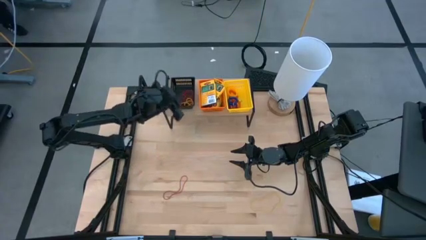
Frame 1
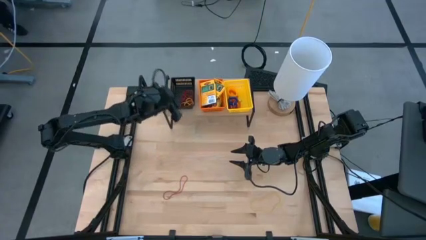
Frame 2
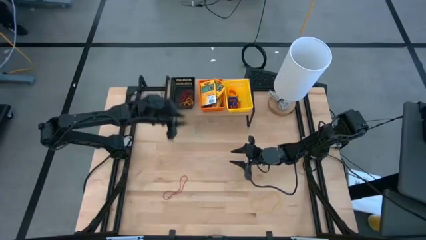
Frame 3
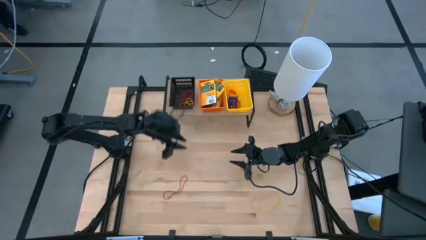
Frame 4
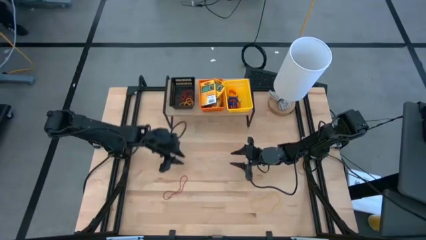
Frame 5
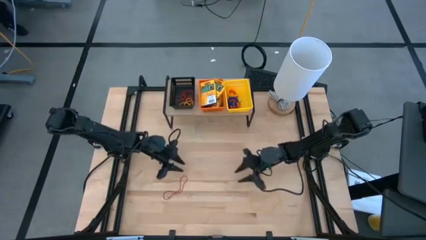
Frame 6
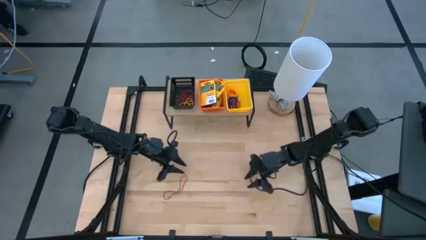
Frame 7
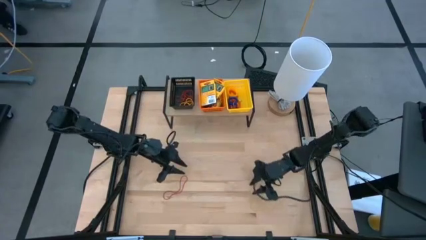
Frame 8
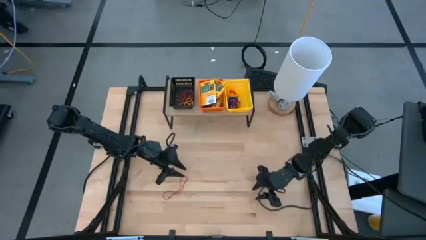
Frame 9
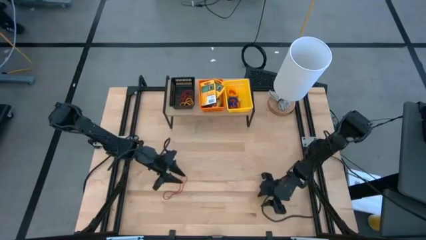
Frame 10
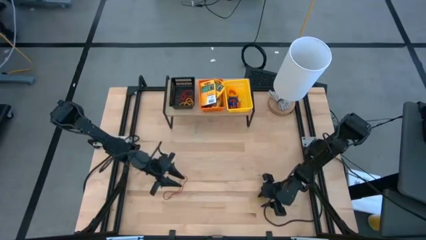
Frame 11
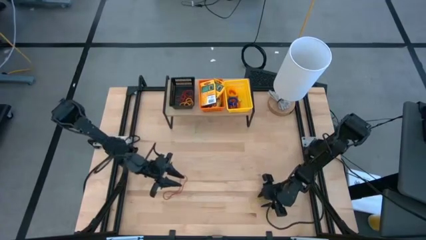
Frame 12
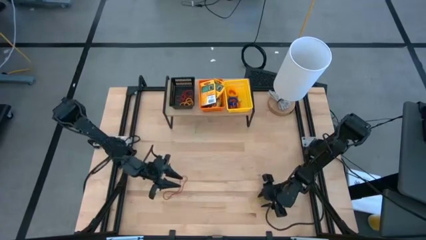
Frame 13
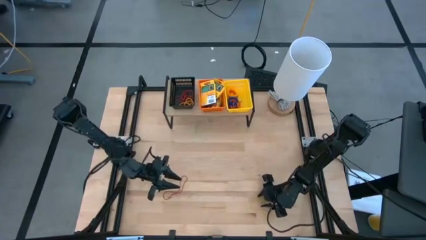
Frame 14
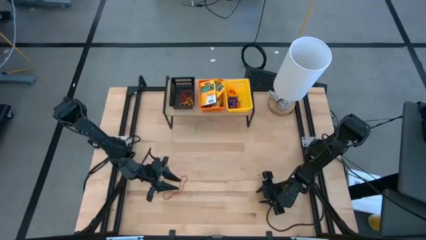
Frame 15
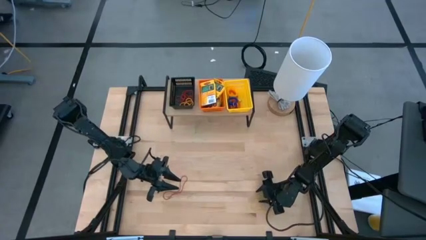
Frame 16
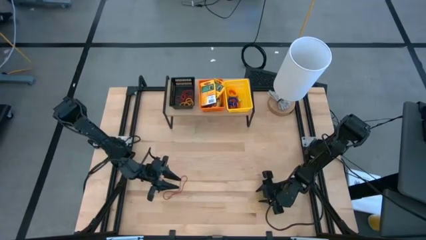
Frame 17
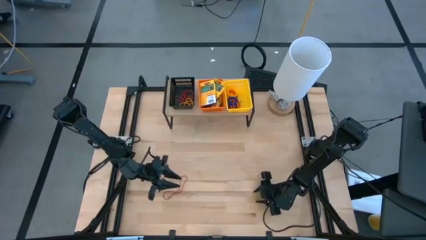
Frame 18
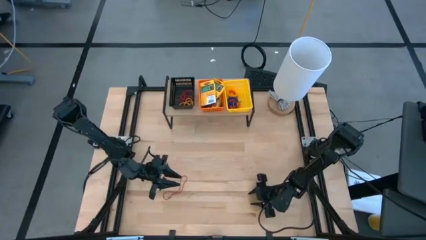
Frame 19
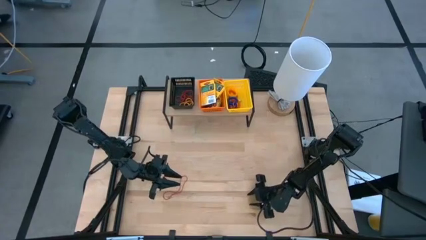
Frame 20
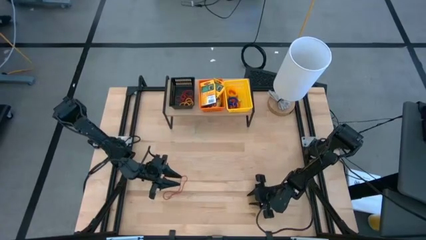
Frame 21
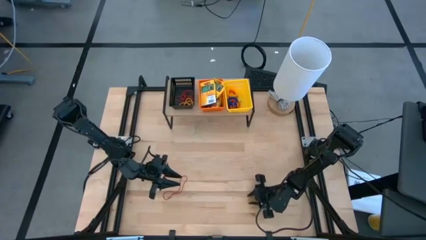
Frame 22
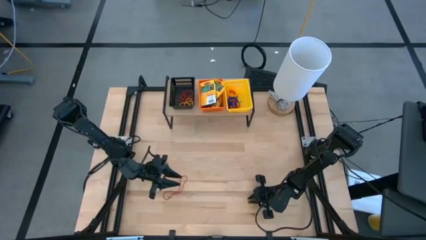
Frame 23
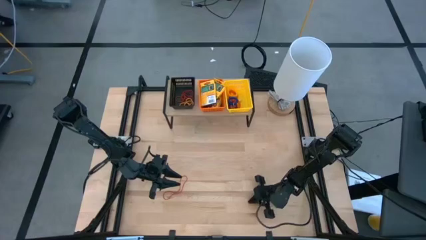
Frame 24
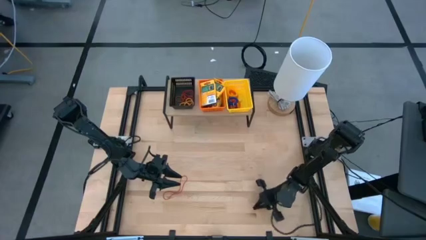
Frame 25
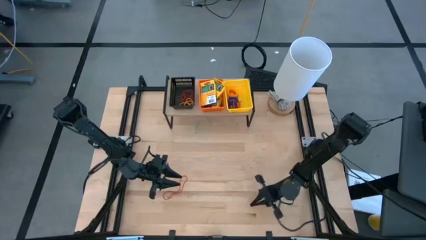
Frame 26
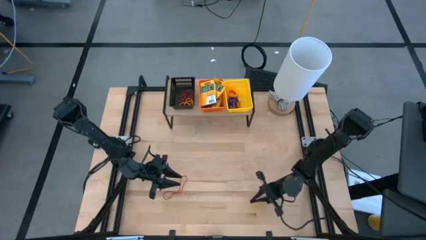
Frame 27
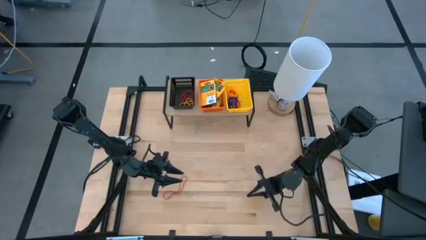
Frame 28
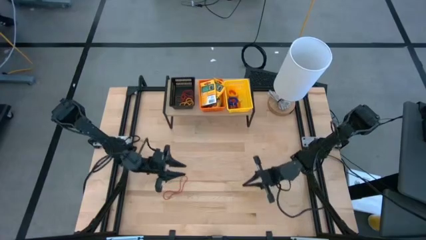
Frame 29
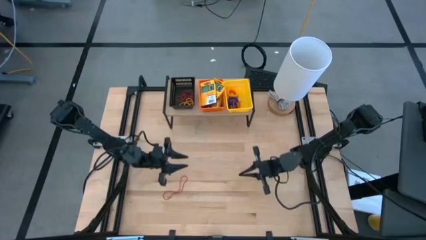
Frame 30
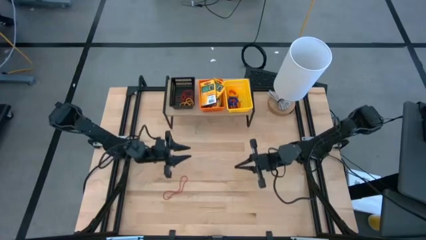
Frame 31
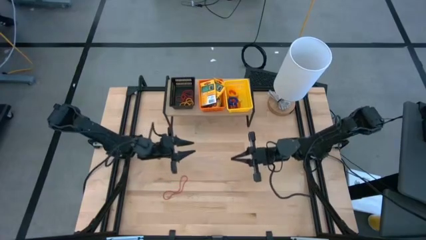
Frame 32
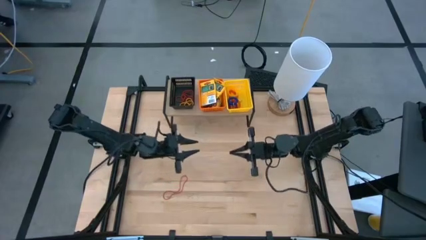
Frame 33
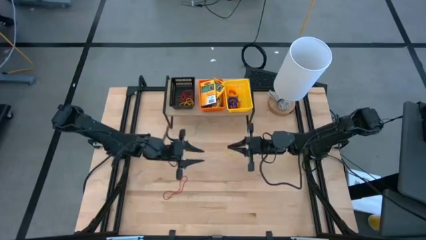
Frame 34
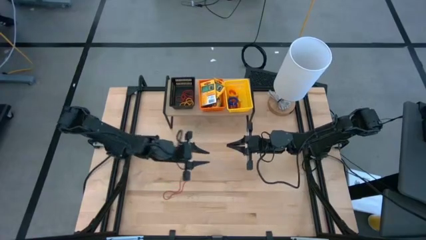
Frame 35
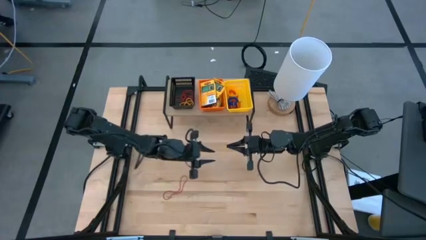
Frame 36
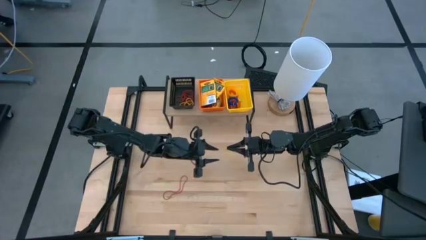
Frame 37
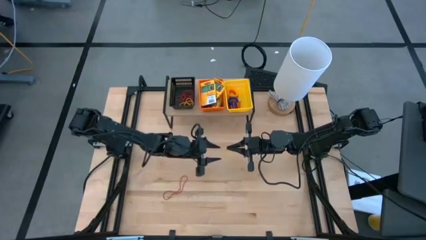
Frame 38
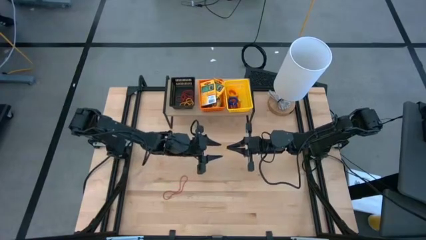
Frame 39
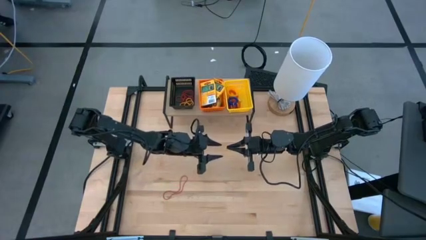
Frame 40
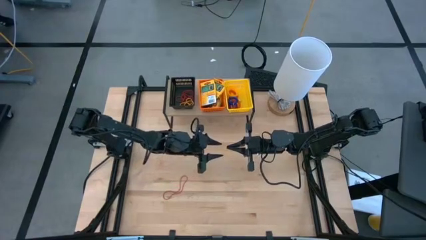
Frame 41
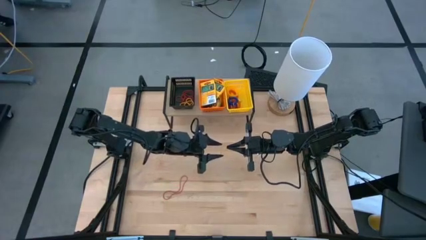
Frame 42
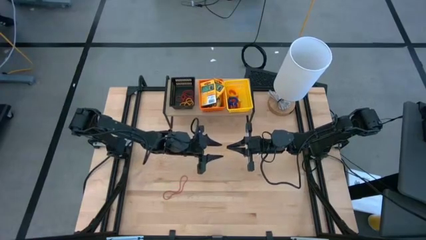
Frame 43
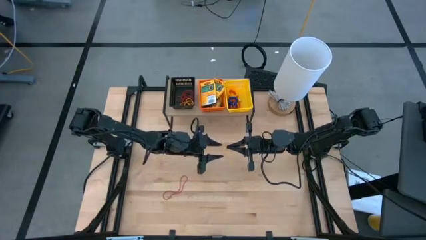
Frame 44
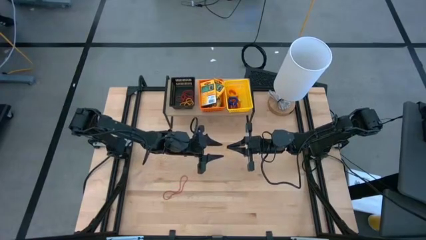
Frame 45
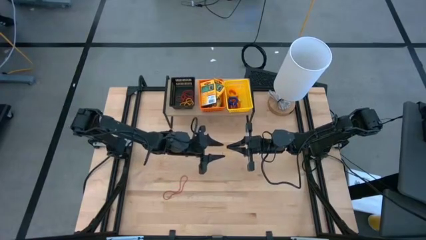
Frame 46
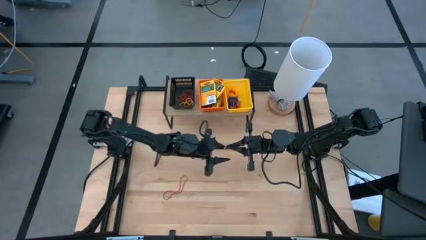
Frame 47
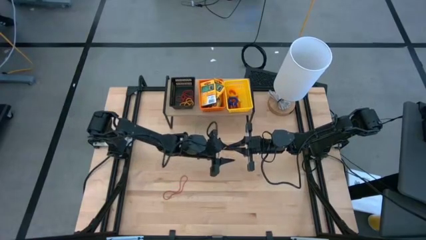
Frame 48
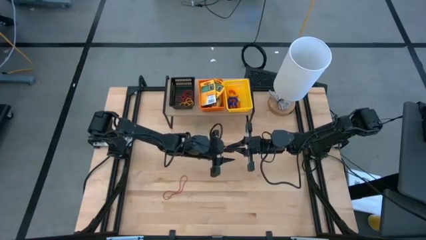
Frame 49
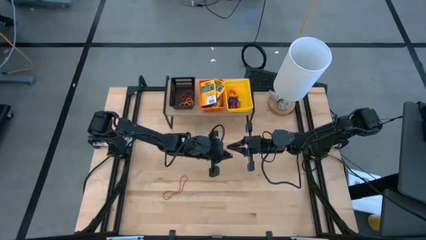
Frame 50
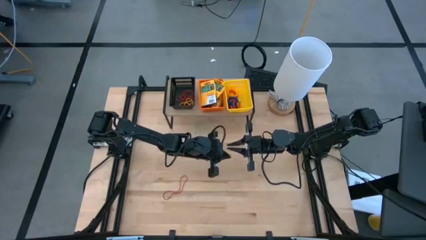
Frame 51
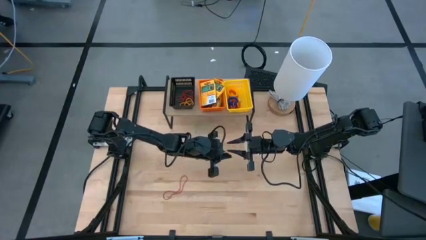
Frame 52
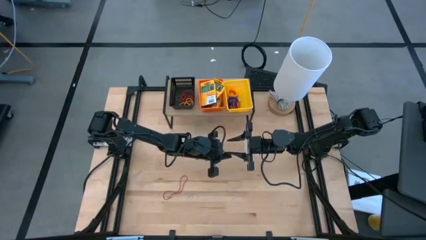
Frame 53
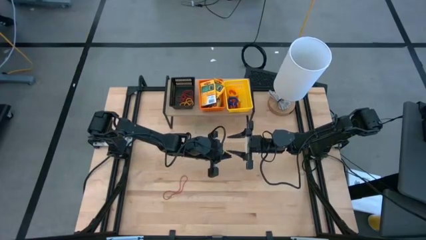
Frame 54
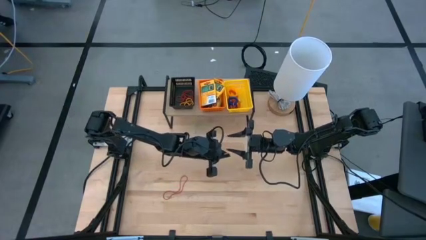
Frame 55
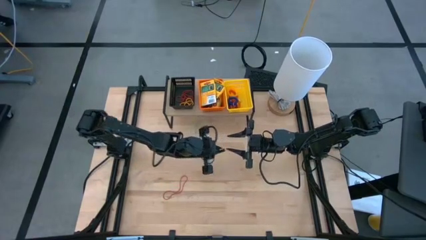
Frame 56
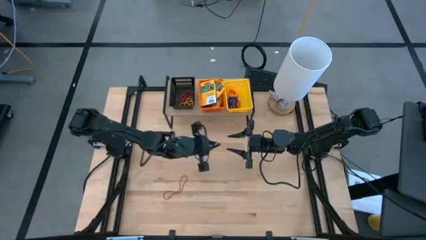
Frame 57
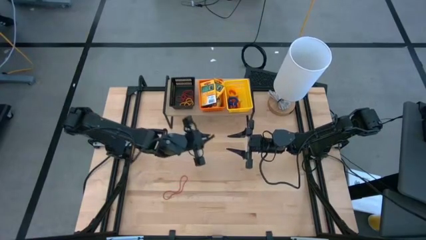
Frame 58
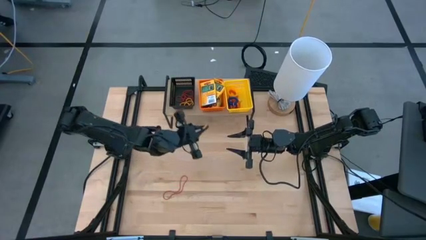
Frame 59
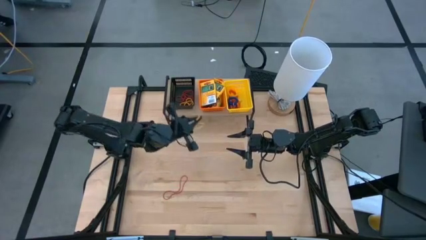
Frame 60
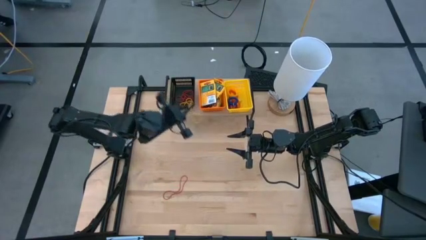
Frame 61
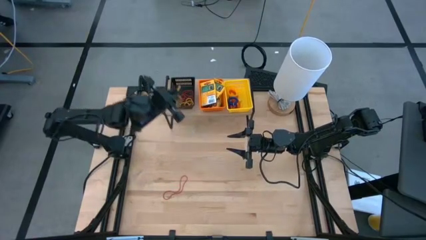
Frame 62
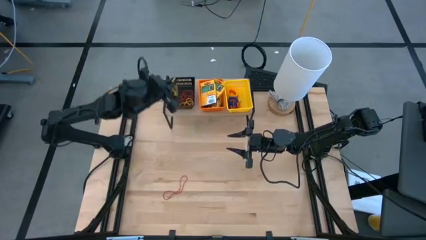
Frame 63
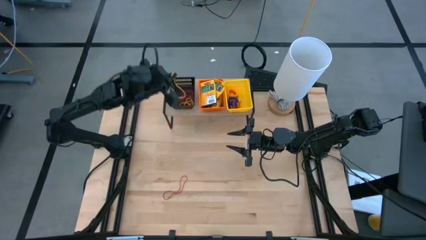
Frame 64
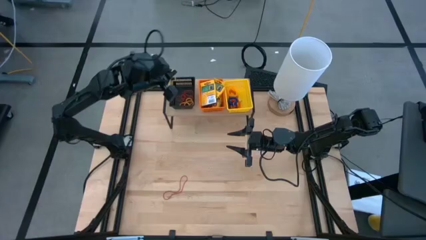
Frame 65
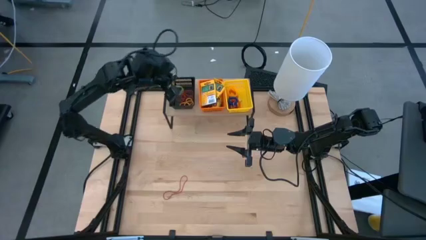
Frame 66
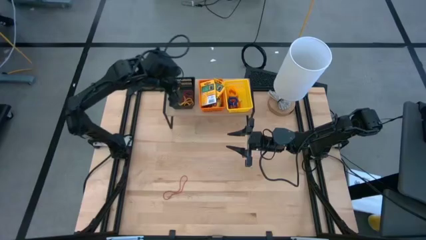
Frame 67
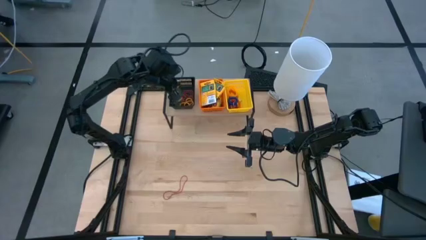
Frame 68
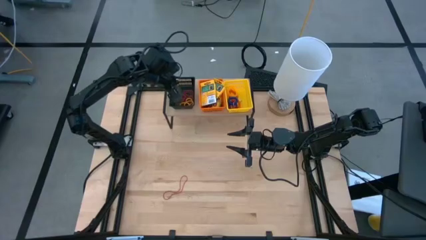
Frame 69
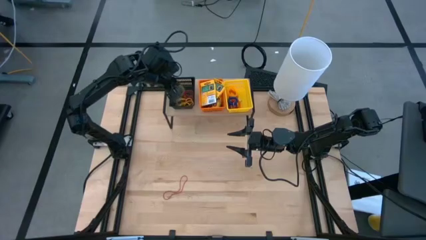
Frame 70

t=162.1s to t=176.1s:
Task: Pick & Place Office Desk Supplies
Put the yellow rubberband into the black bin on the shelf

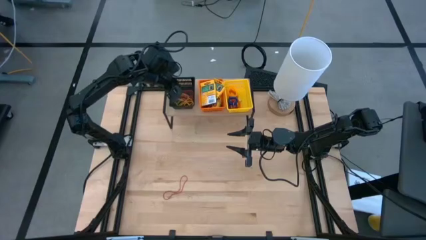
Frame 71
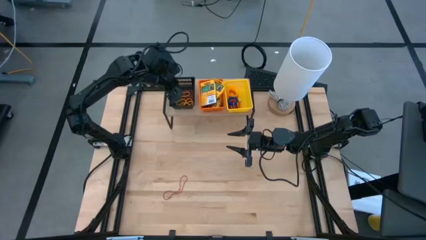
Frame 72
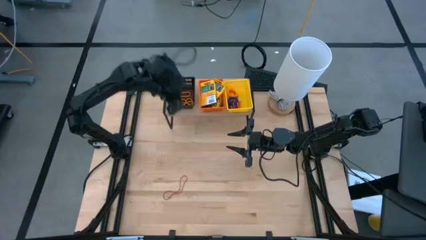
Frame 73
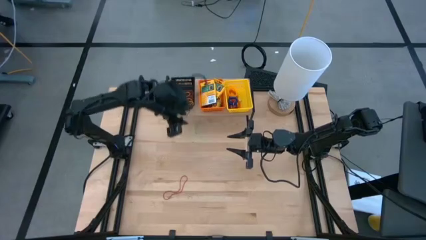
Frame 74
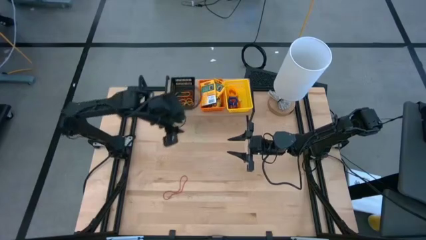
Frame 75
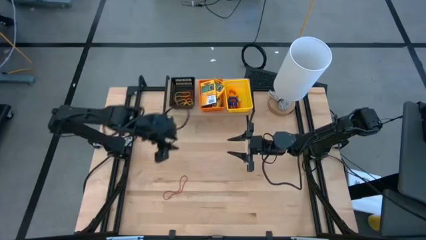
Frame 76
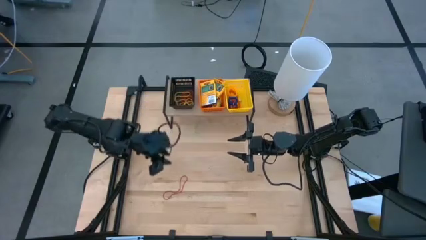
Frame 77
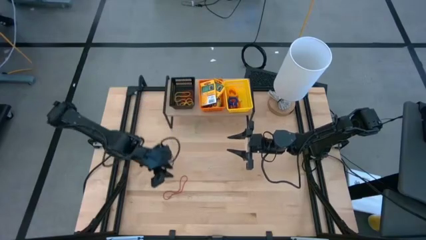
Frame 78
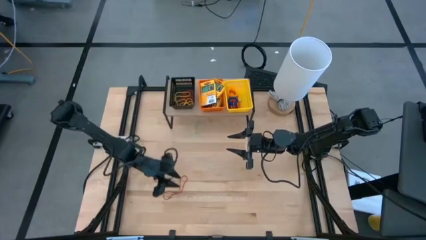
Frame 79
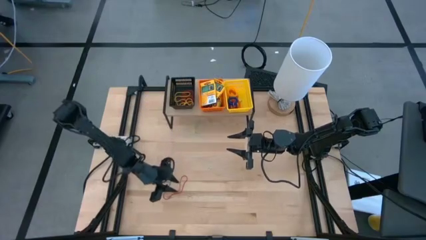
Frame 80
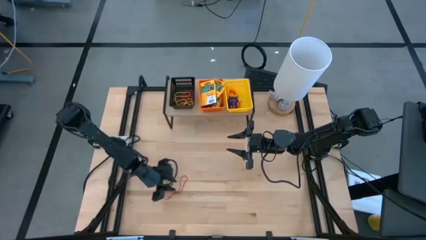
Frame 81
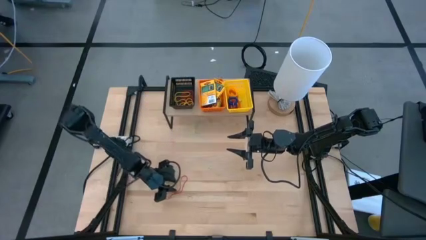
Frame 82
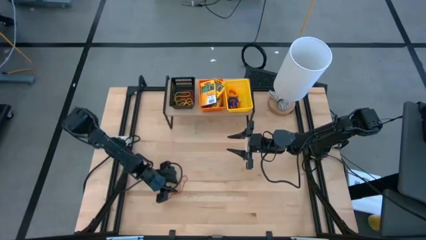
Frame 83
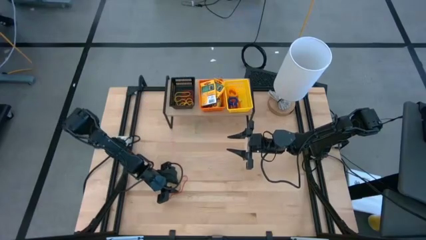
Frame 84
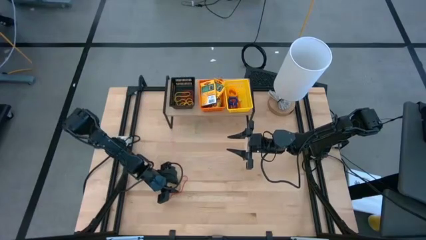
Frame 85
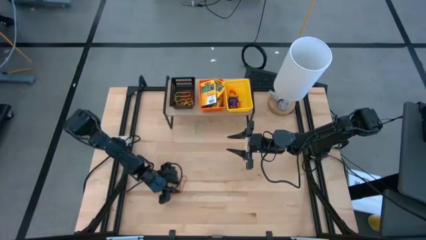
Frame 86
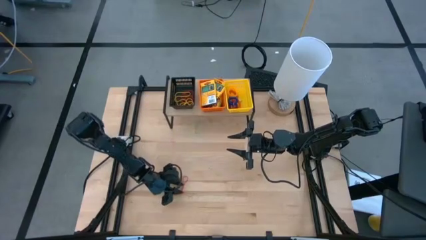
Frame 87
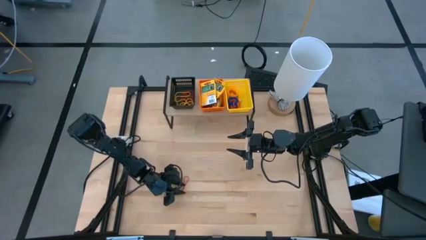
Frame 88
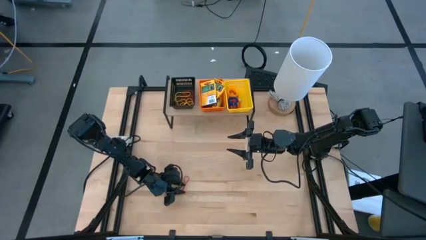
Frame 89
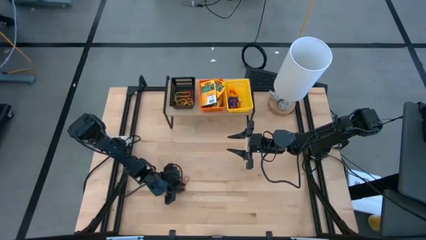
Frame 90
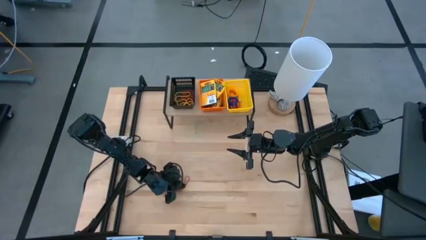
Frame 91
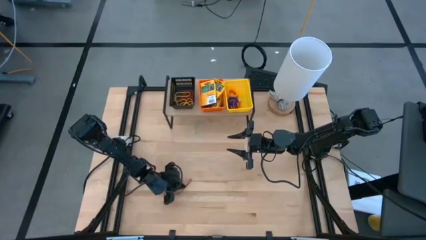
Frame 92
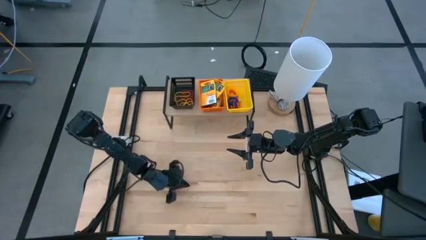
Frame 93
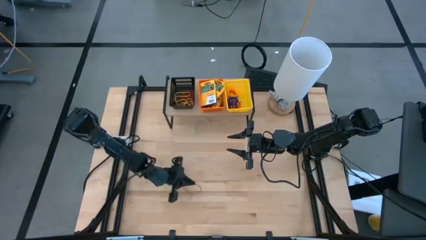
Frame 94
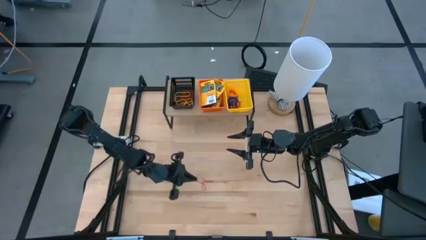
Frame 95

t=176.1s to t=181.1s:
Put the red rubberband into the black bin on the shelf
